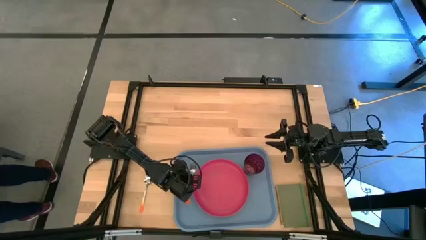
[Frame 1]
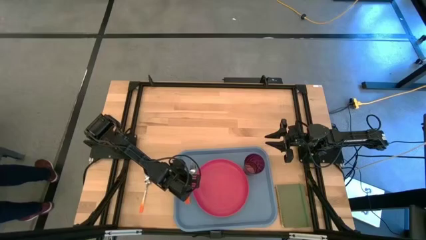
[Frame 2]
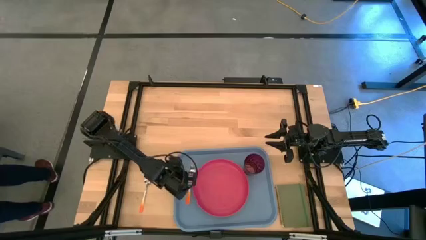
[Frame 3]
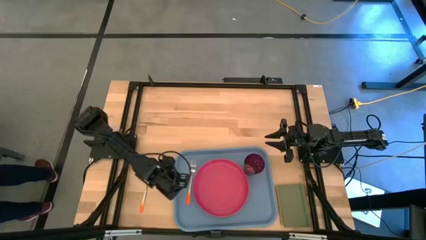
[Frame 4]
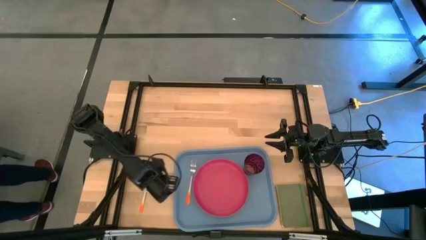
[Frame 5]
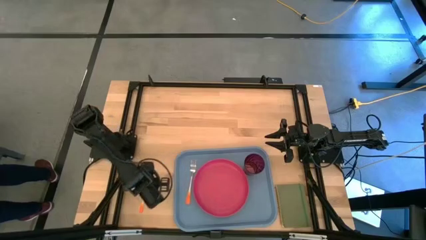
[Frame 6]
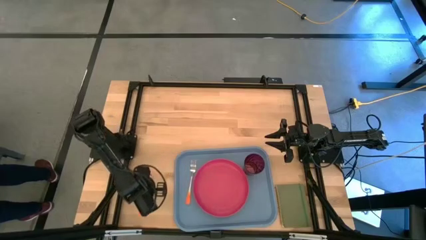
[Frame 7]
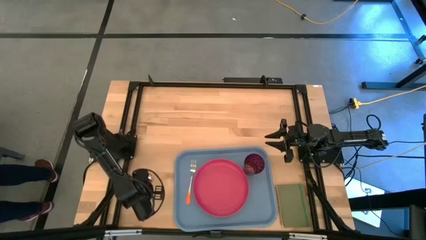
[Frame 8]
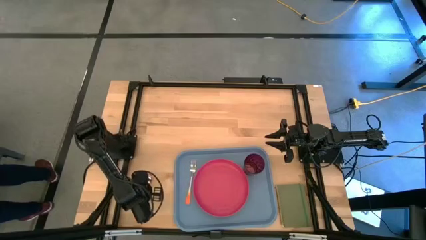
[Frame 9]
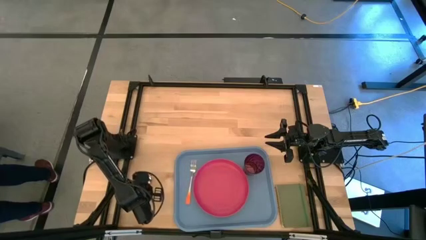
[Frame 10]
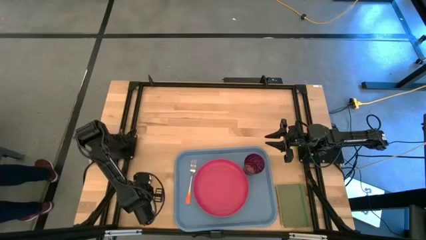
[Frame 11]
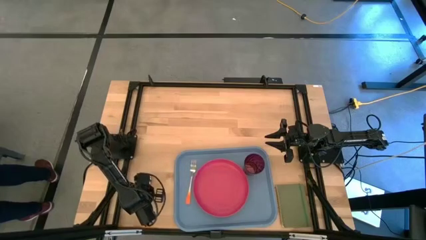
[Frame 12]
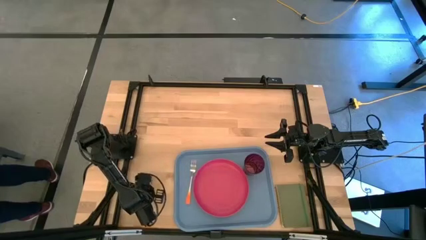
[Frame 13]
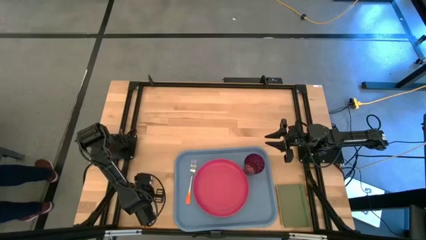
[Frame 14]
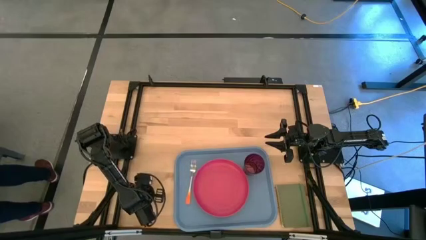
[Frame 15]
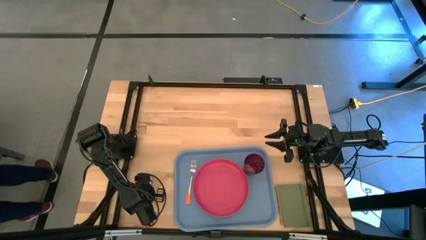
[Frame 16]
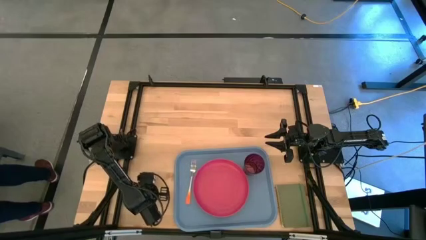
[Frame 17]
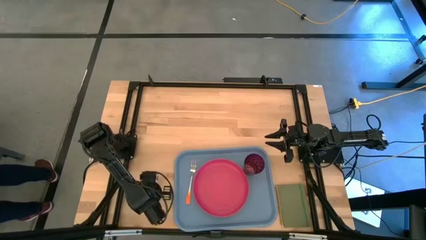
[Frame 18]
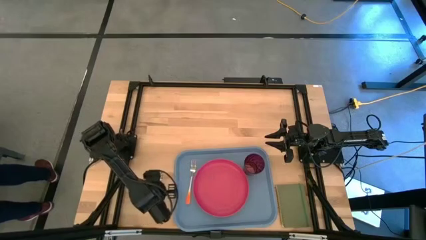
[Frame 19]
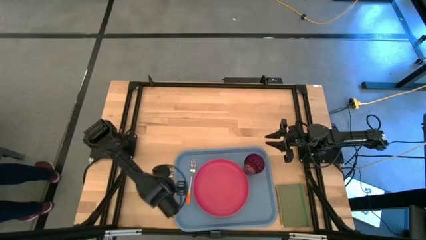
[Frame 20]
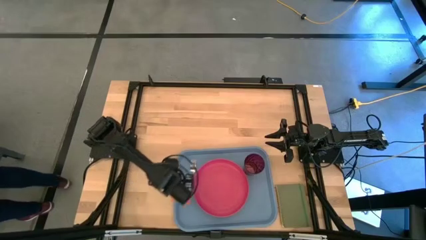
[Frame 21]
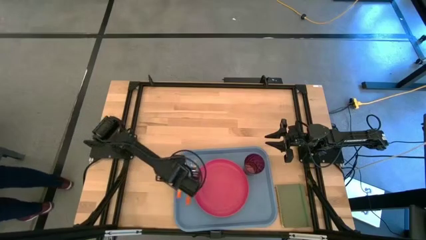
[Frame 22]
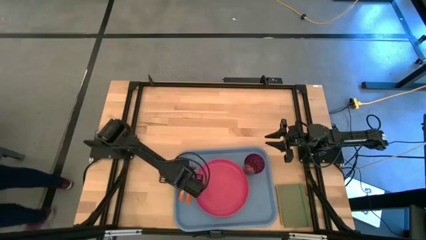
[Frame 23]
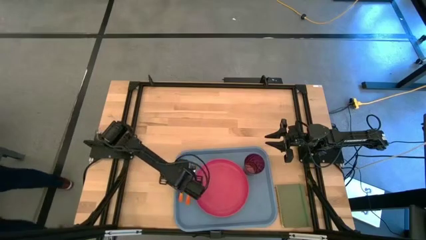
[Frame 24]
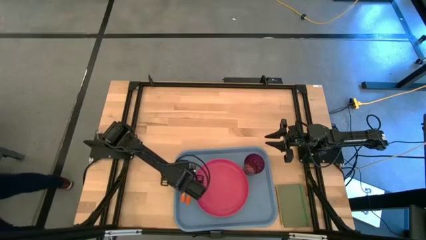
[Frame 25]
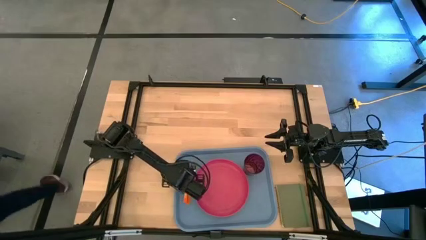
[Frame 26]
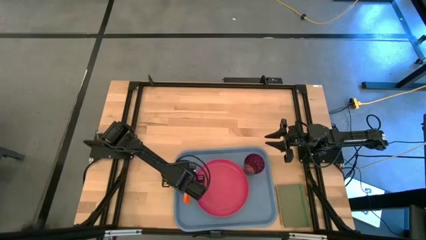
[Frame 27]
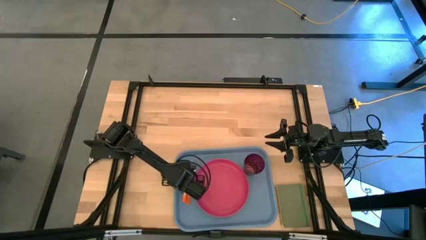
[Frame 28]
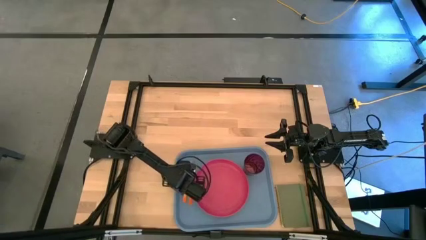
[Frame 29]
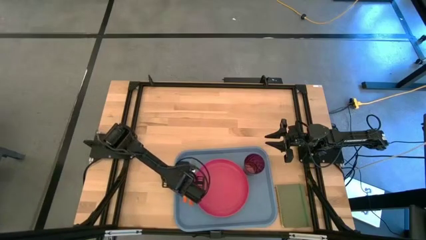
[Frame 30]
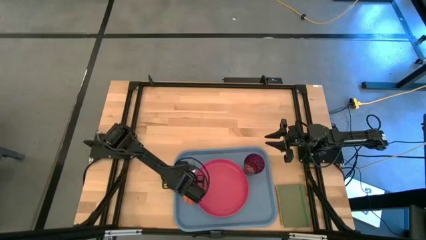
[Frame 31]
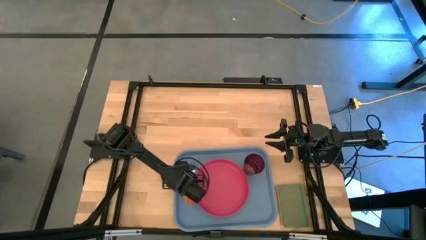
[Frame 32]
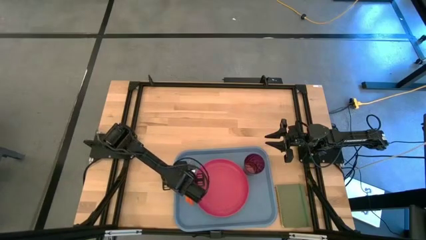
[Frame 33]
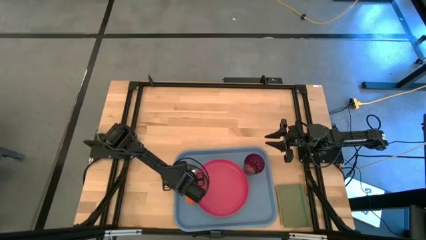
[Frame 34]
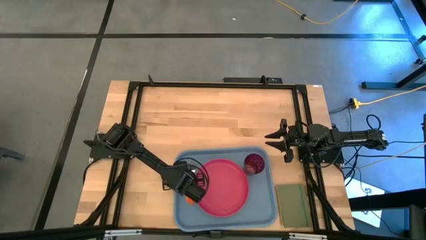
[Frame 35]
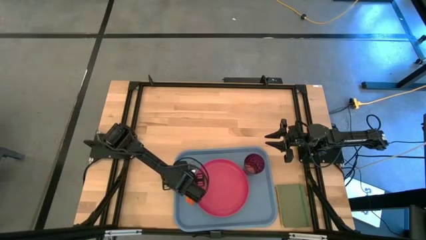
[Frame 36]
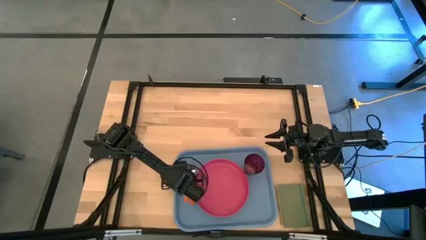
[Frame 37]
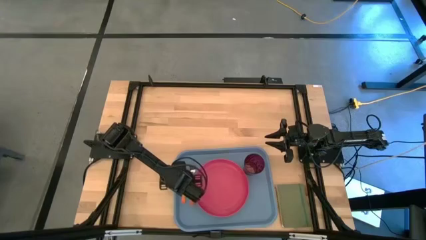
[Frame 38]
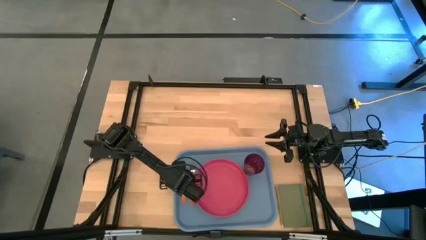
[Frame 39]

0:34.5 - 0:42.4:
Task: Pick and place plate/cup/fork/spoon on tray
Put the orange spoon on the blue tray to the left side of the orange fork

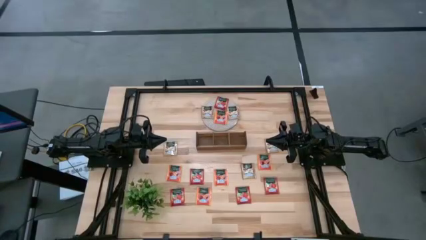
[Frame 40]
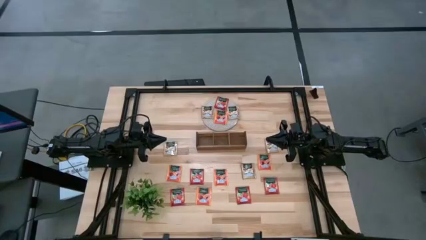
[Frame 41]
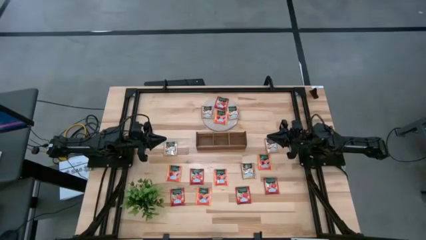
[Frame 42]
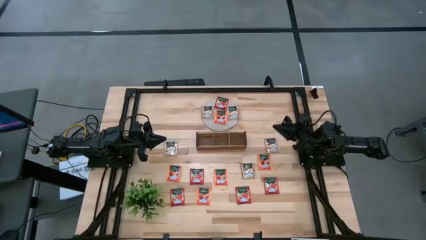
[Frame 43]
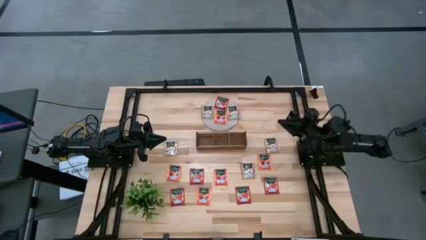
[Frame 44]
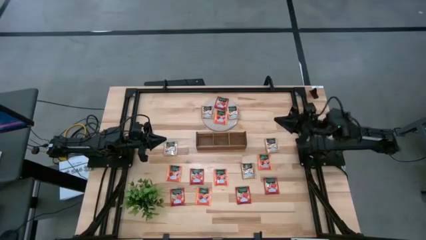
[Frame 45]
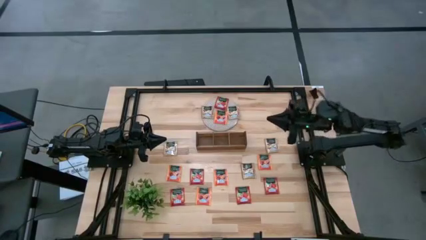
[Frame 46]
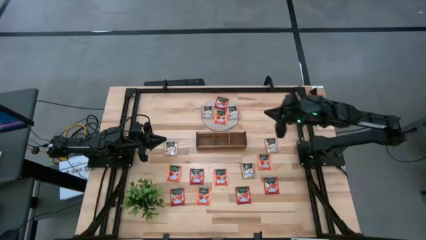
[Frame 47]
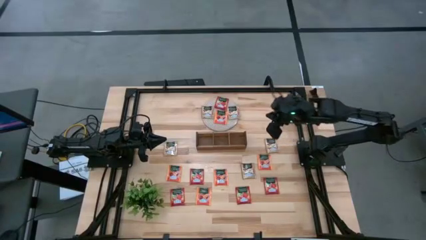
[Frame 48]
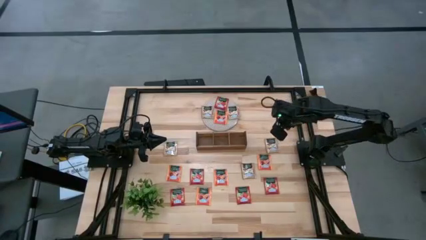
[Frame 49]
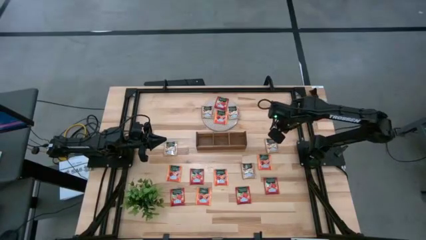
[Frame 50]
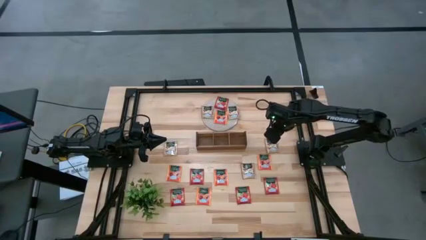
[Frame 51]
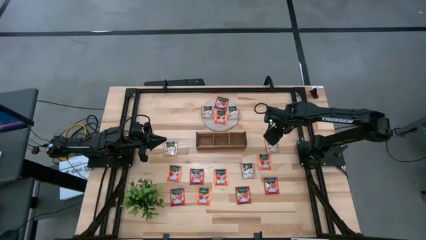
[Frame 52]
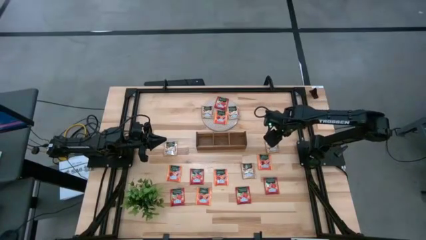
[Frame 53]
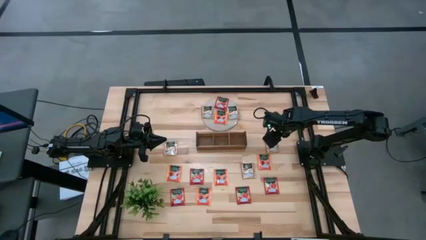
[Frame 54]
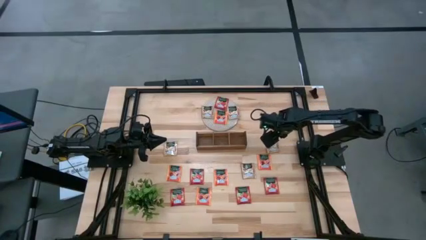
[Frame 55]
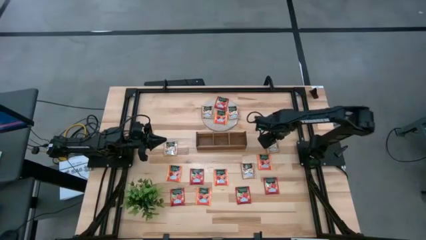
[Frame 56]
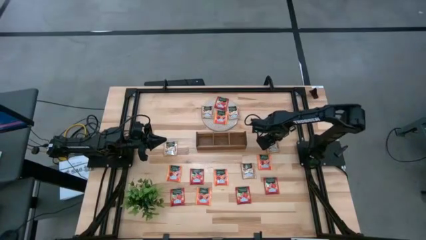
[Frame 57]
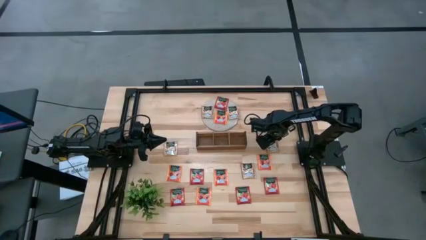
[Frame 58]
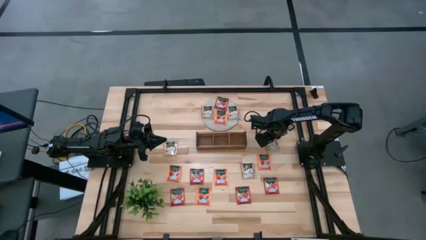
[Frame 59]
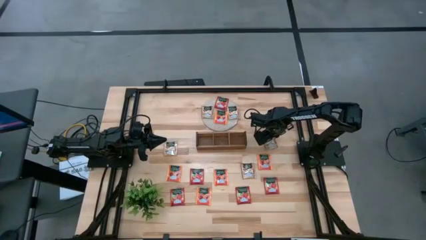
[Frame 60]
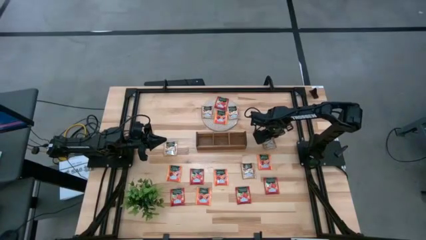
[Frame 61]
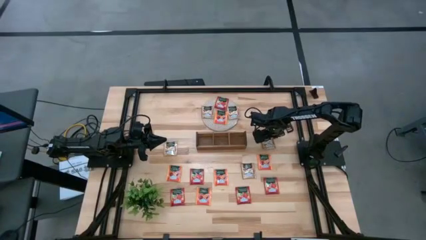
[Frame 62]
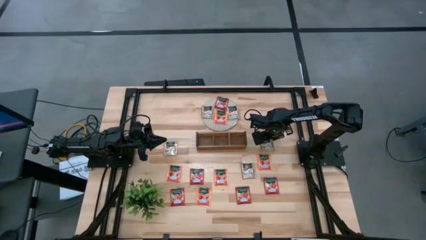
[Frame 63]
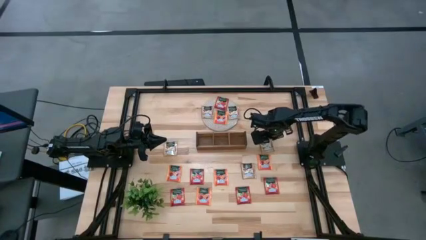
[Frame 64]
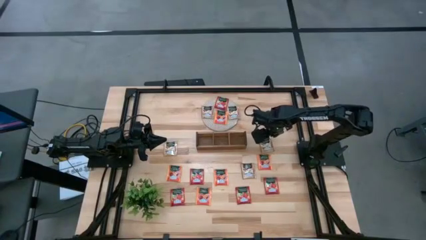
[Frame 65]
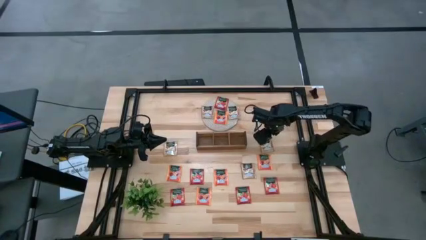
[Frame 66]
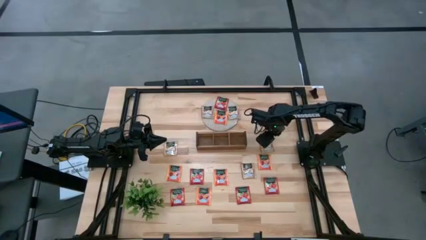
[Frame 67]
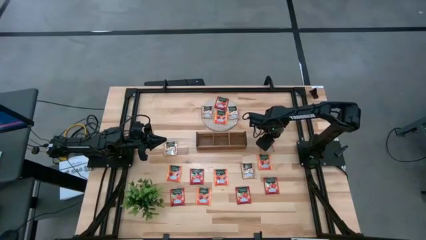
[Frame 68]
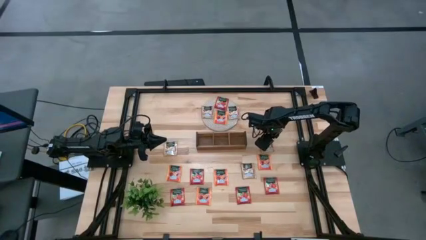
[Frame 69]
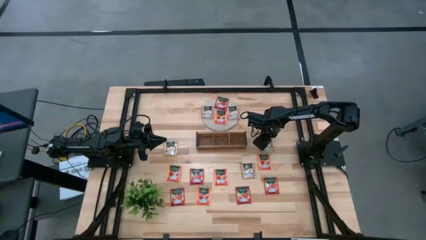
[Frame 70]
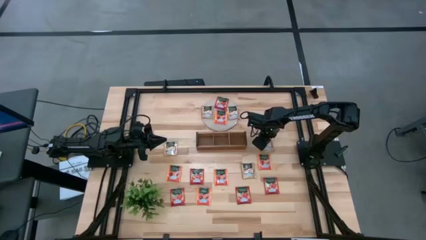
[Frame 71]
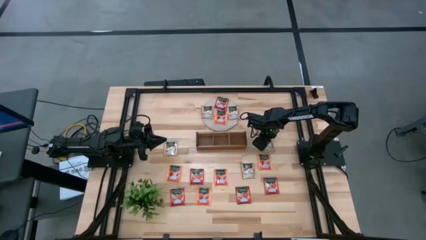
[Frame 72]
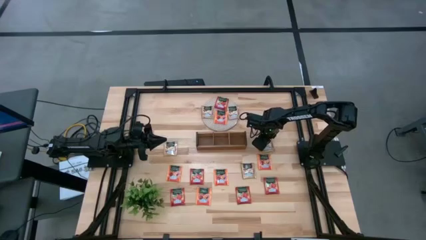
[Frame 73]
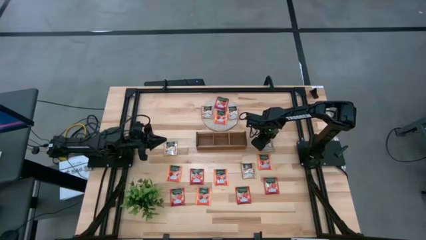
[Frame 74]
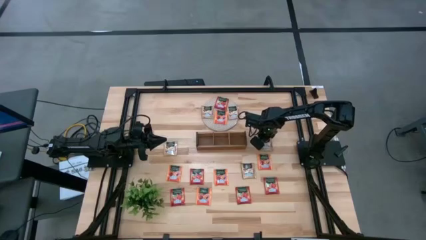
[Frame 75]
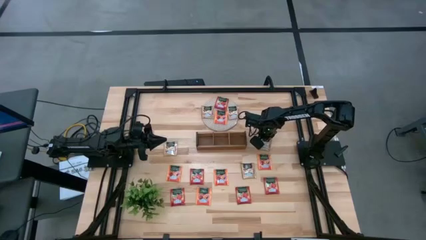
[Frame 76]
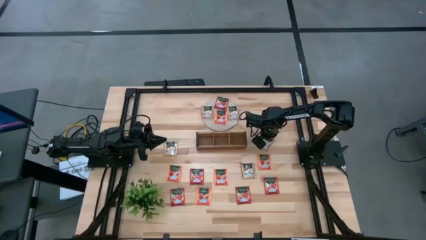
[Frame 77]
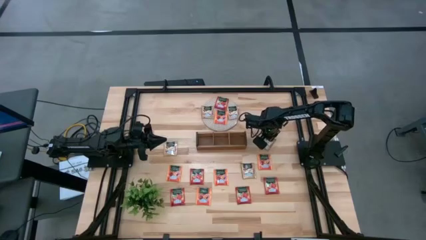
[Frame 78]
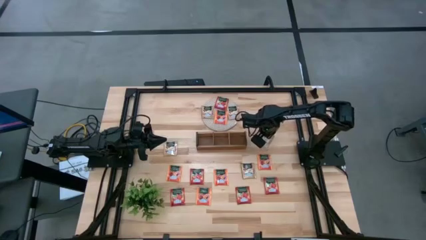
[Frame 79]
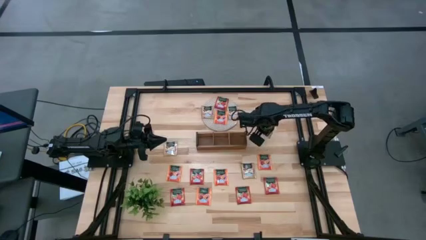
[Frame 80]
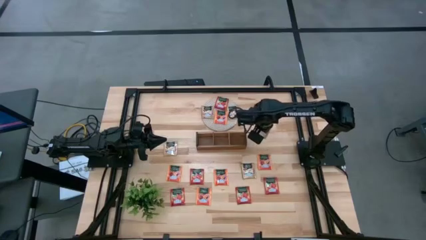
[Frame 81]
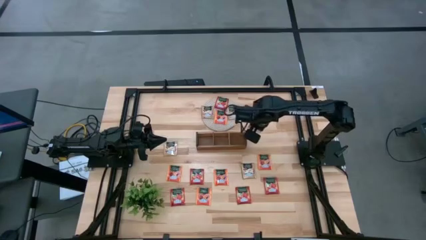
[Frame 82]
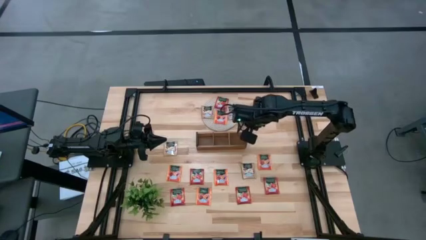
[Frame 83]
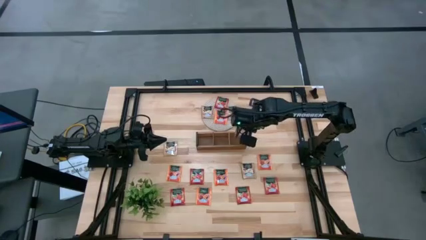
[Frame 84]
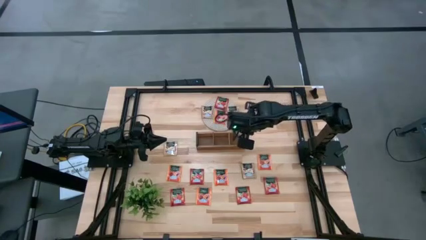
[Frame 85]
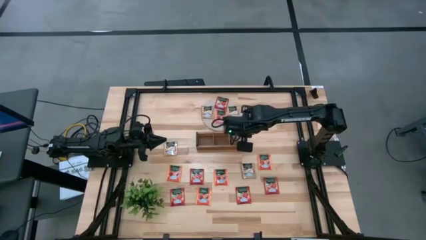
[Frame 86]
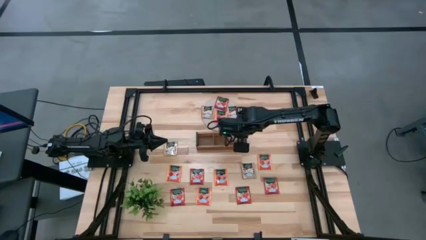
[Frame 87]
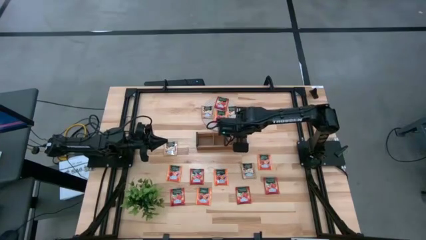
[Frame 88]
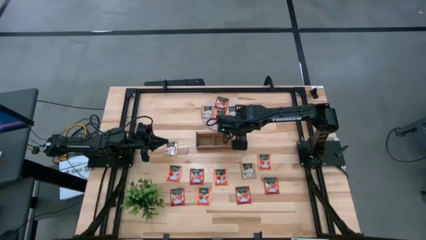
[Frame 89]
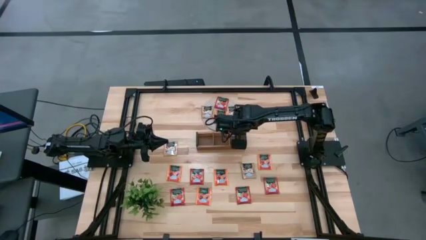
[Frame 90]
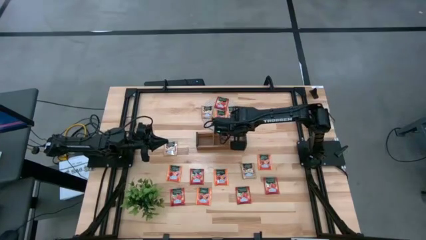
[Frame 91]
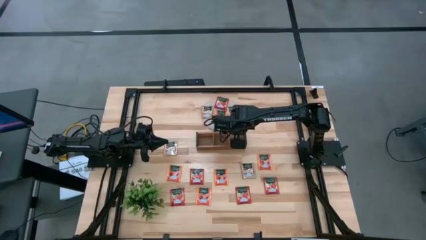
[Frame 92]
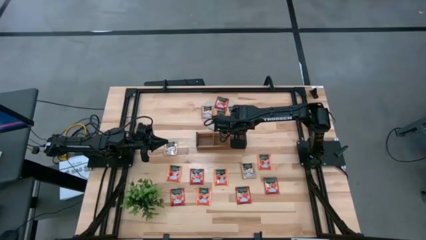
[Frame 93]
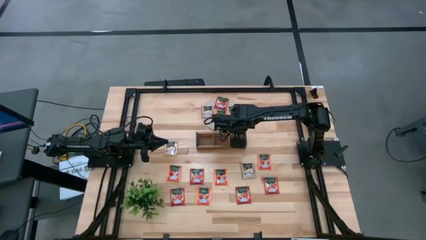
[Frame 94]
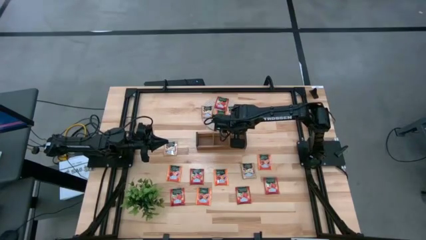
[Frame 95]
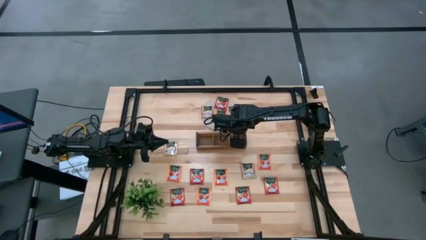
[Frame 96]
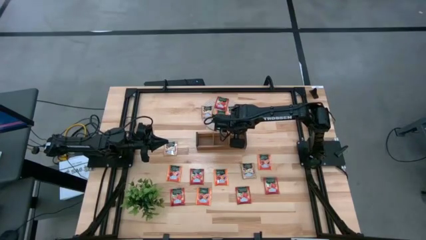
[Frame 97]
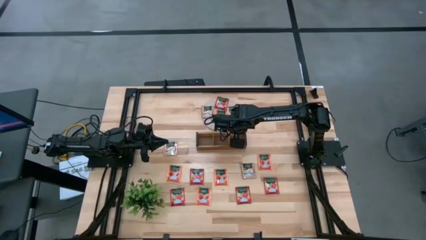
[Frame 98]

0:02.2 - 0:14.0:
Task: Pick & Place Tea
Put the brown tea bag into the right section of the wooden organizer
